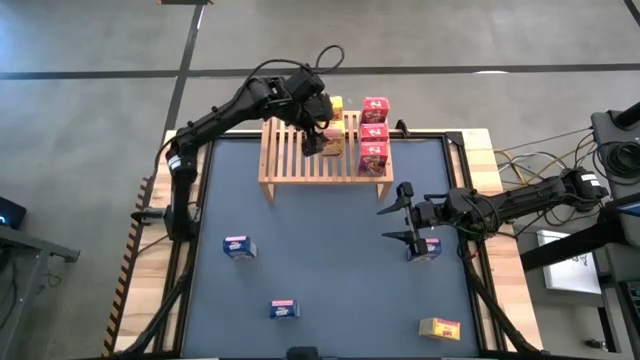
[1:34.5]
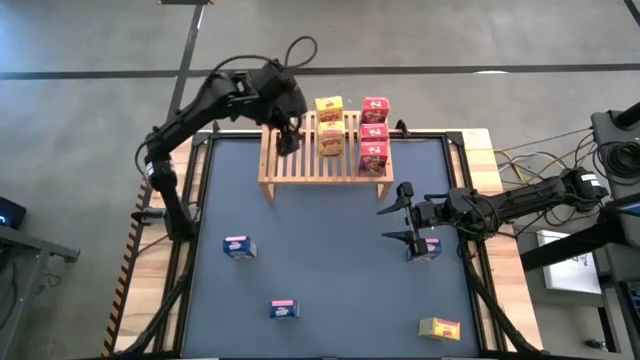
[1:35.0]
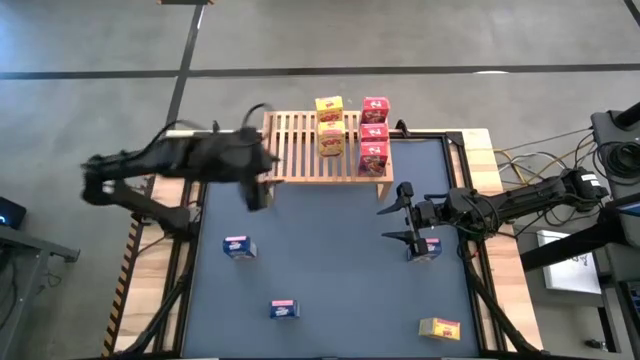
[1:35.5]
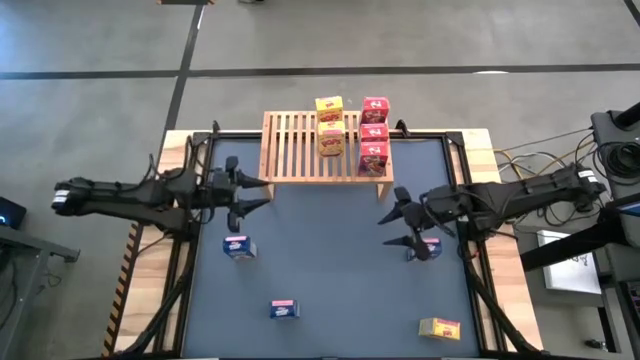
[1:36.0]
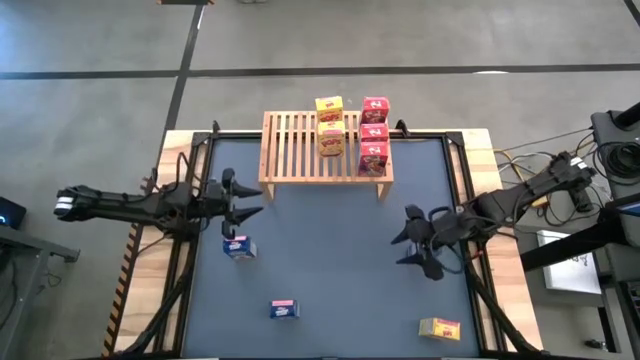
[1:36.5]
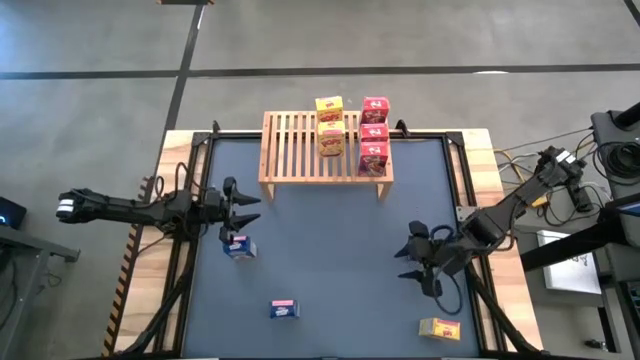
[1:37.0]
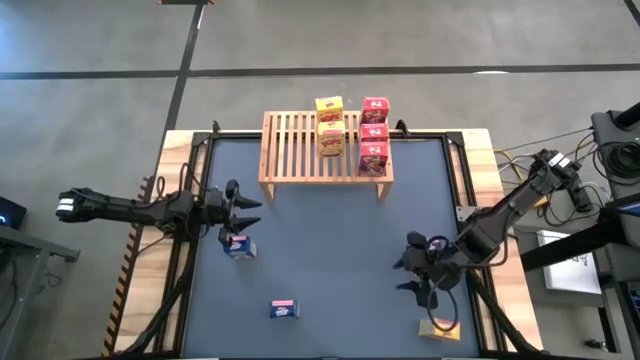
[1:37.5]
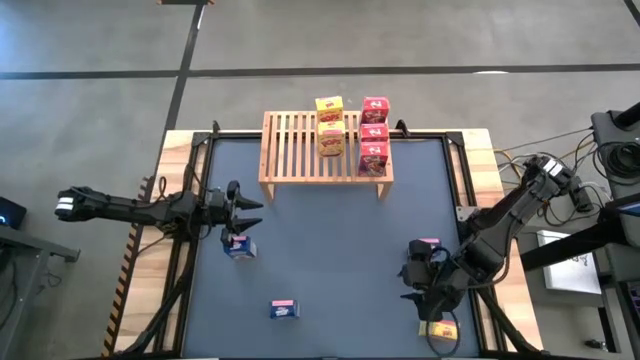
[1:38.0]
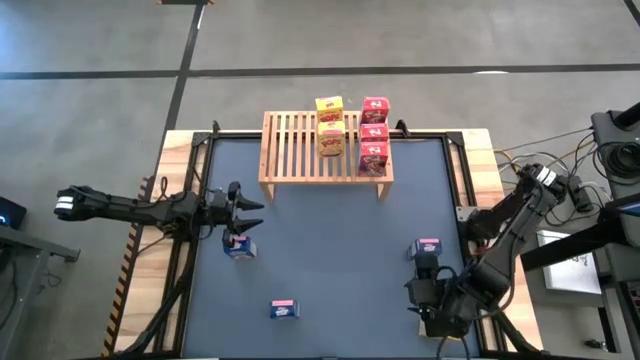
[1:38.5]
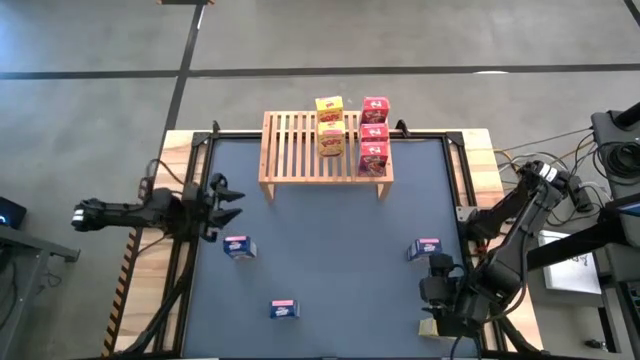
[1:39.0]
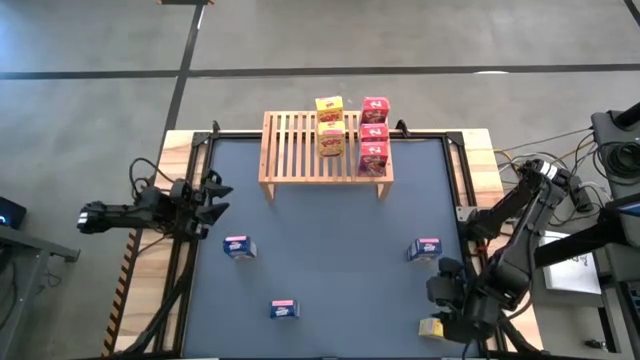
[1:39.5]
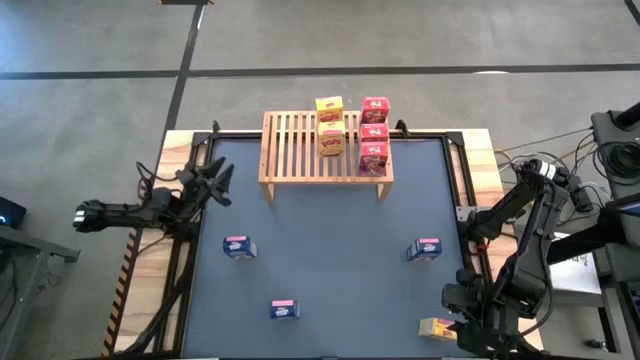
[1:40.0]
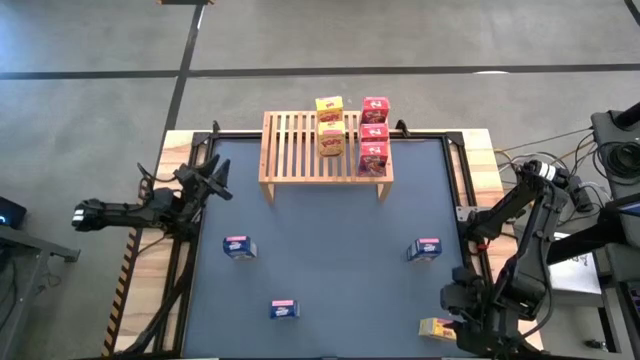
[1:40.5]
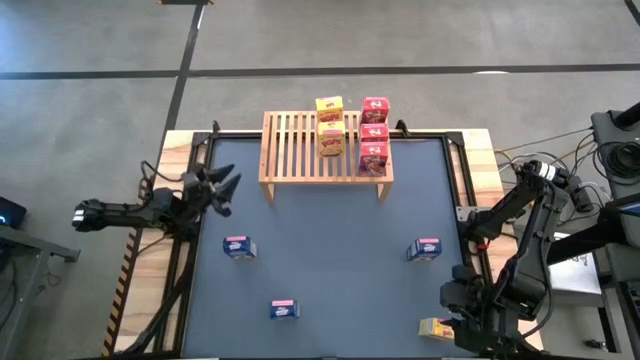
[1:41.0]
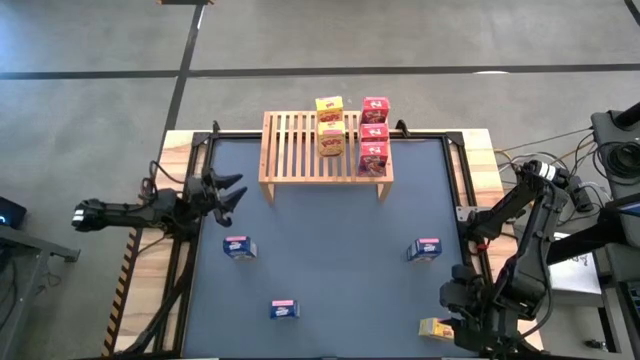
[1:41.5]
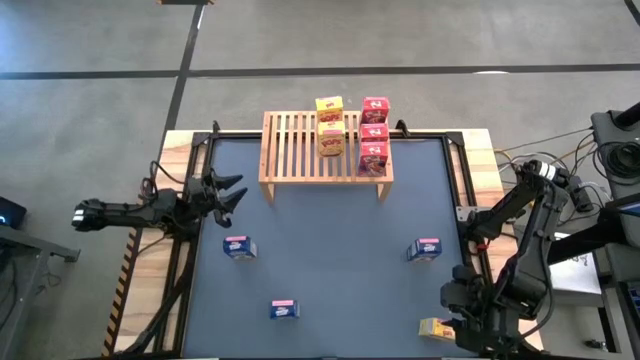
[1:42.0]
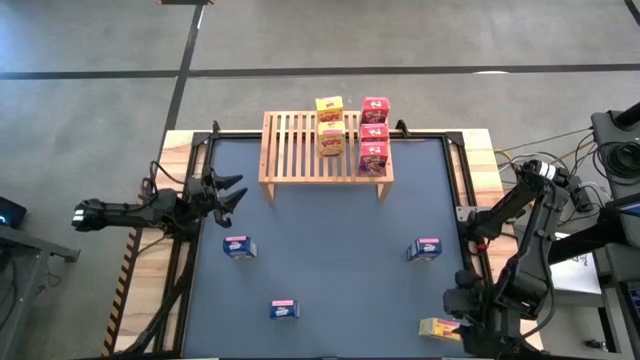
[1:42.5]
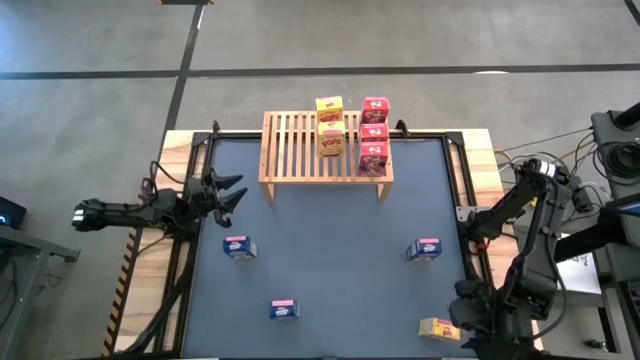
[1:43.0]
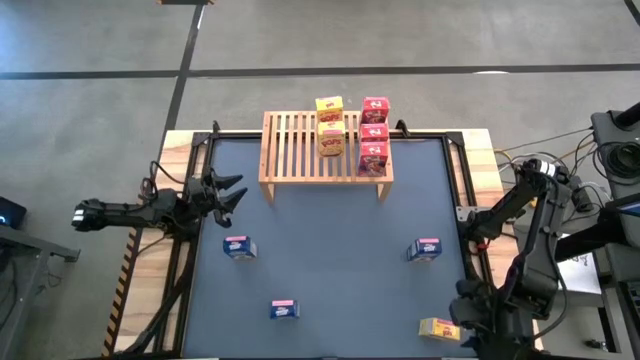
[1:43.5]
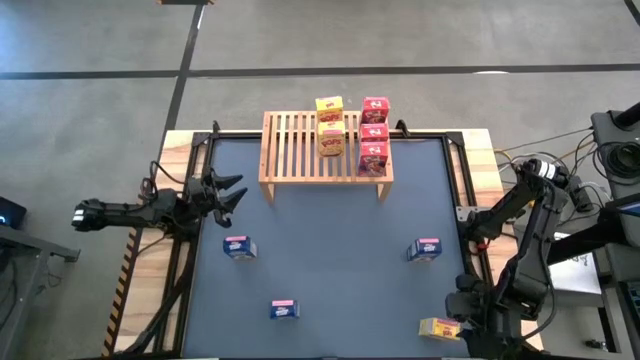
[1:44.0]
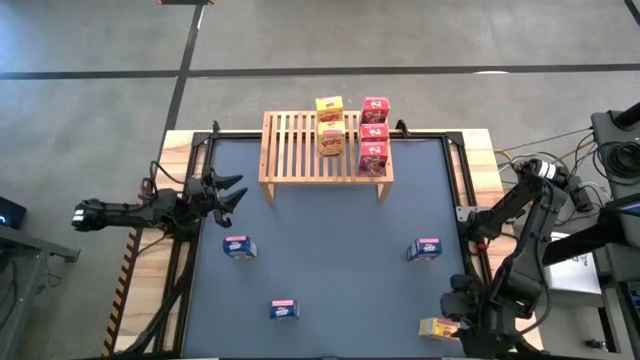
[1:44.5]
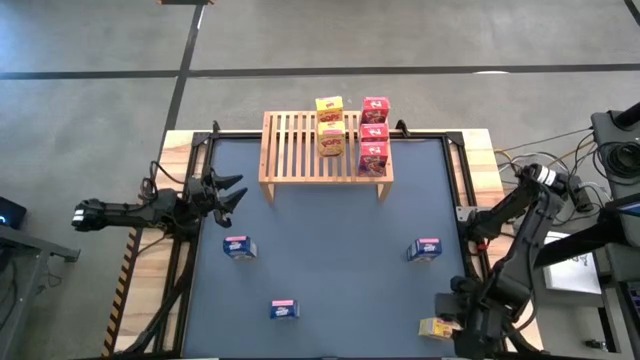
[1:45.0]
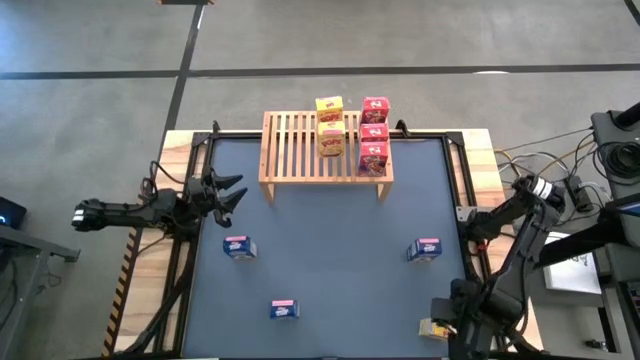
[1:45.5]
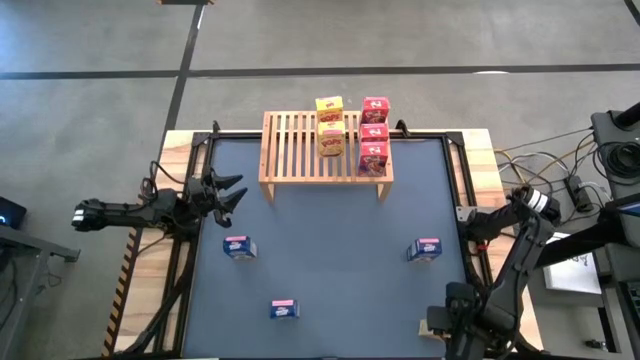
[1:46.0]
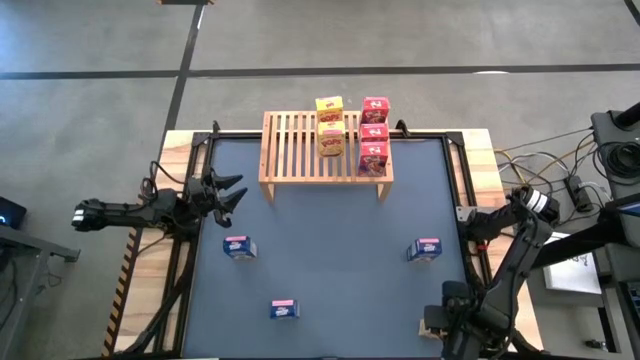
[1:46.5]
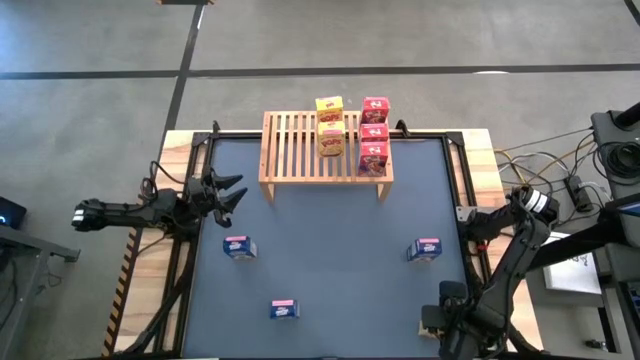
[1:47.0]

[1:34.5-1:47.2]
Task: Stack cereal on shelf
Put the yellow cereal box on the shelf aligned with the other yellow cereal boxes

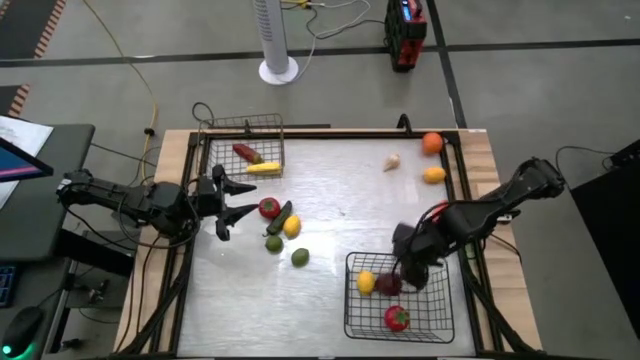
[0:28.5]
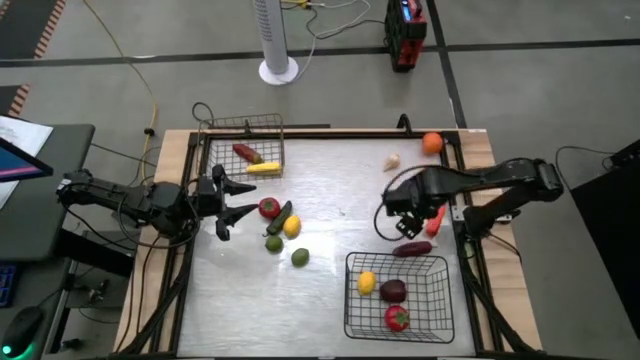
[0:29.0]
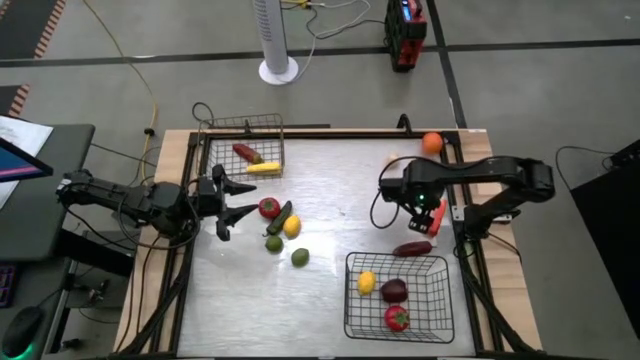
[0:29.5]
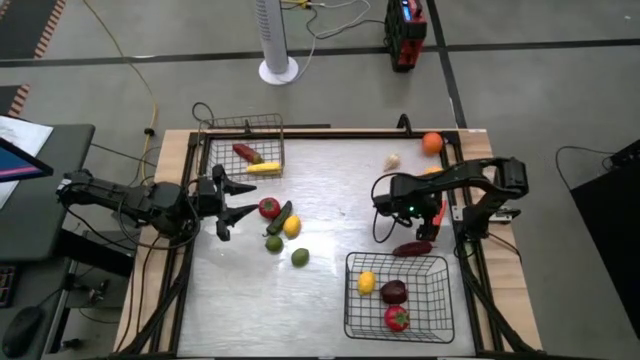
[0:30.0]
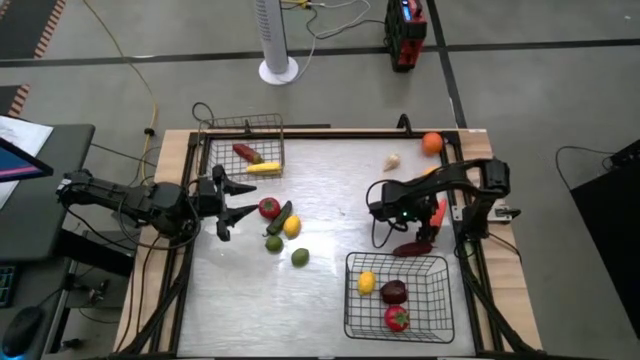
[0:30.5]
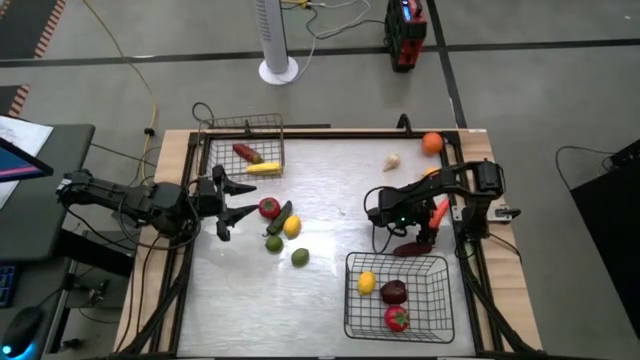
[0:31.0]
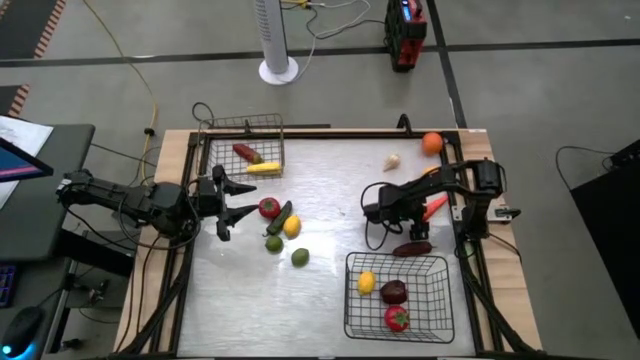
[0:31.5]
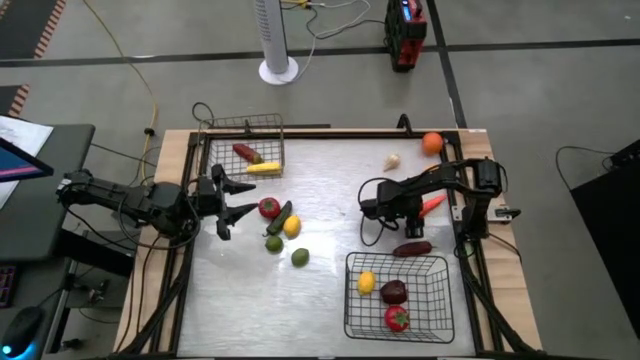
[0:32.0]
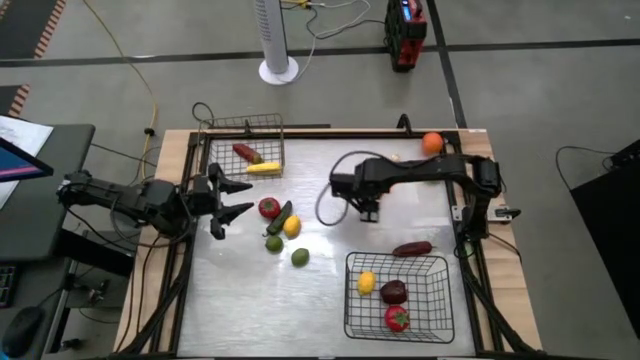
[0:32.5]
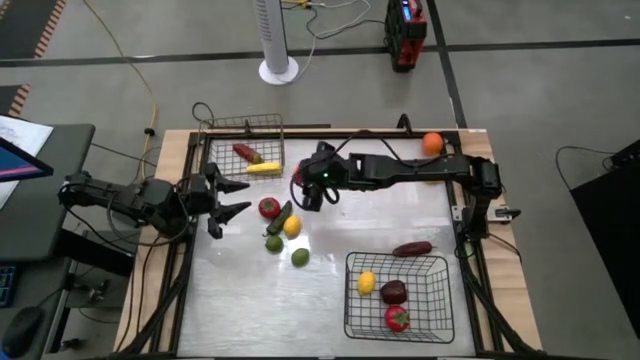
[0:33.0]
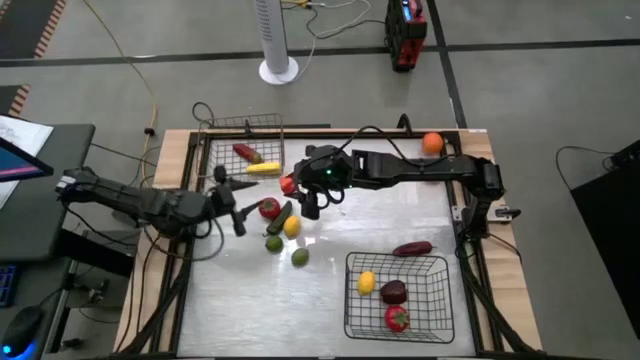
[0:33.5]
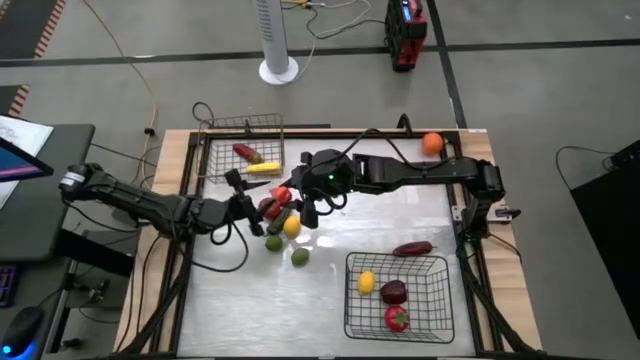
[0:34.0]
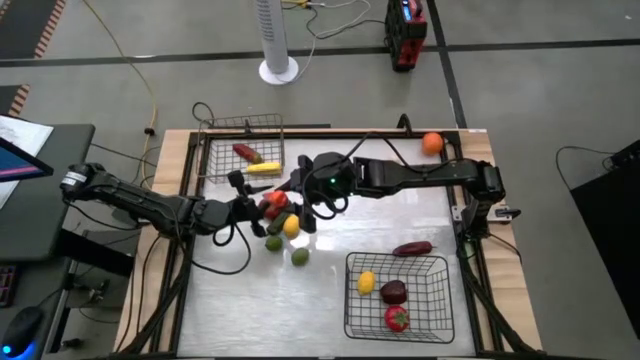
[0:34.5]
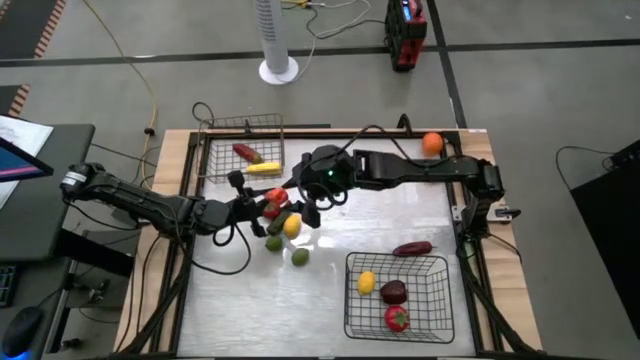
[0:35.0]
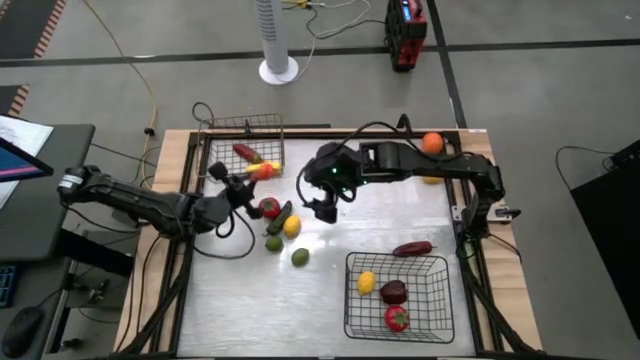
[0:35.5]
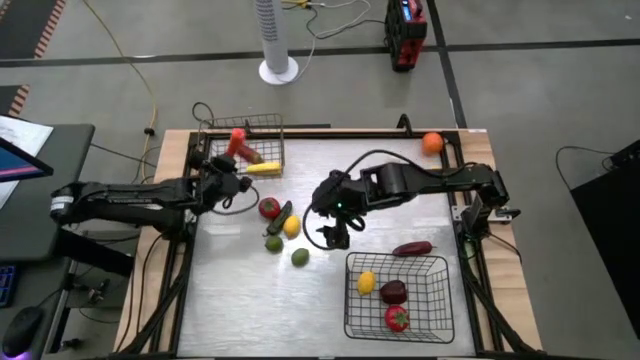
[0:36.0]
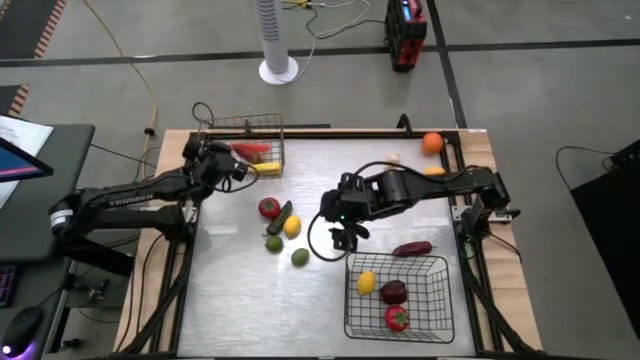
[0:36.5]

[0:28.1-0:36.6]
Task: Sort produce into baskets
Put the carrot into the top wire basket
